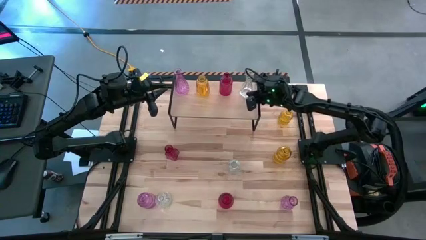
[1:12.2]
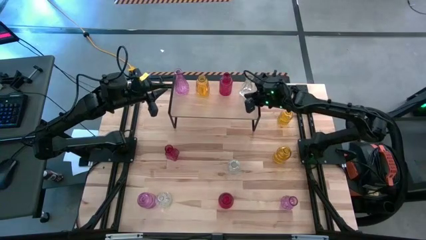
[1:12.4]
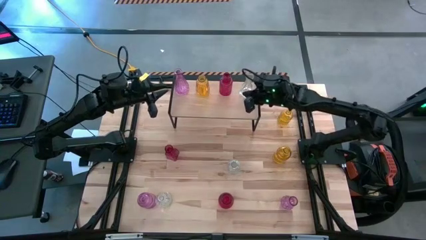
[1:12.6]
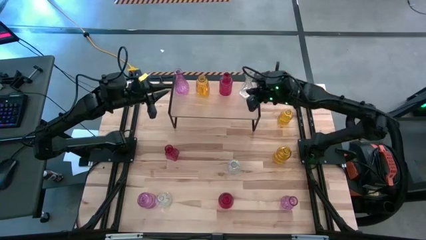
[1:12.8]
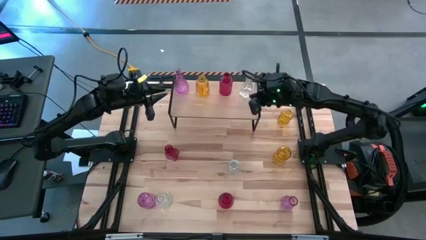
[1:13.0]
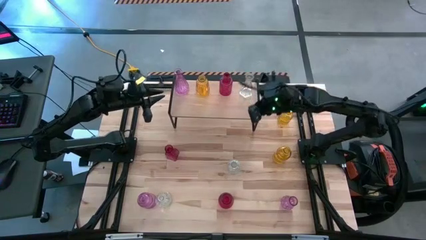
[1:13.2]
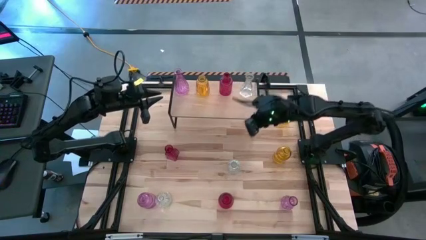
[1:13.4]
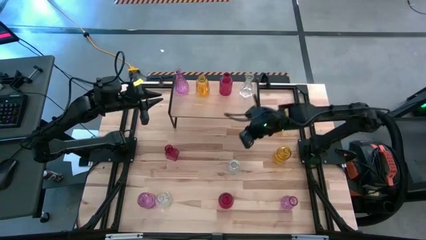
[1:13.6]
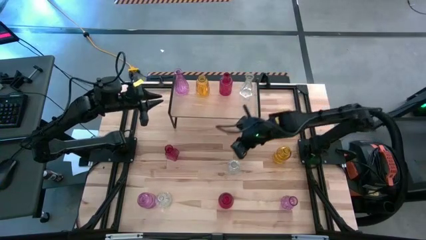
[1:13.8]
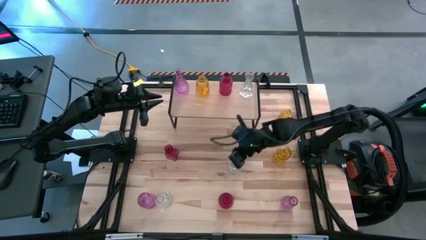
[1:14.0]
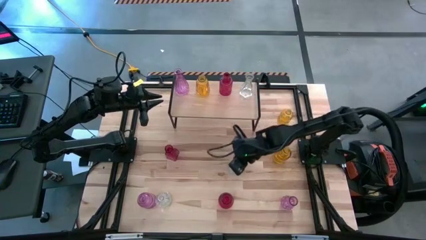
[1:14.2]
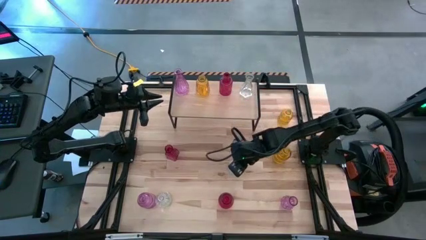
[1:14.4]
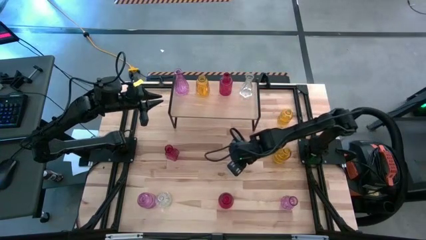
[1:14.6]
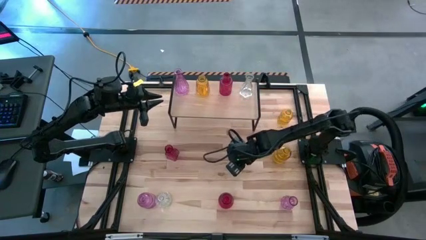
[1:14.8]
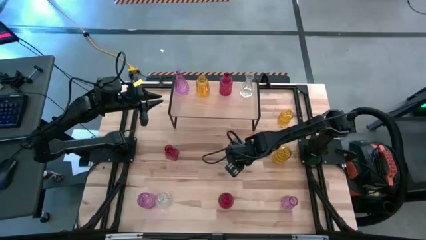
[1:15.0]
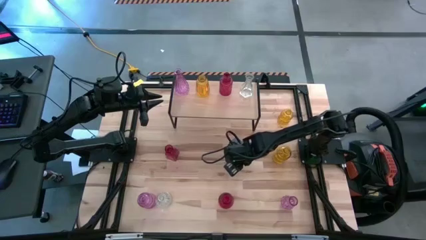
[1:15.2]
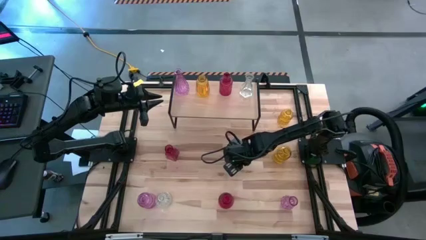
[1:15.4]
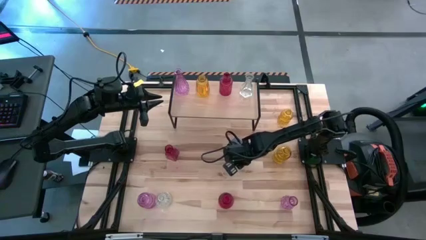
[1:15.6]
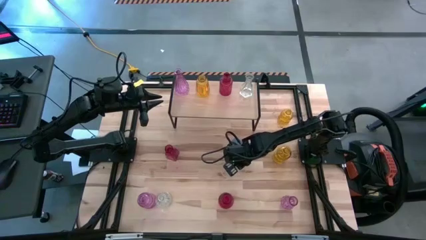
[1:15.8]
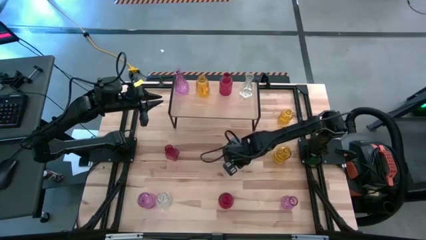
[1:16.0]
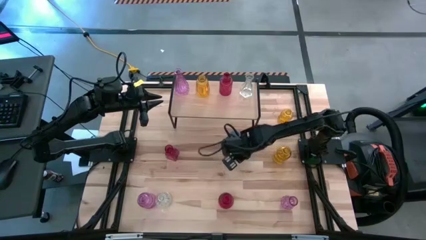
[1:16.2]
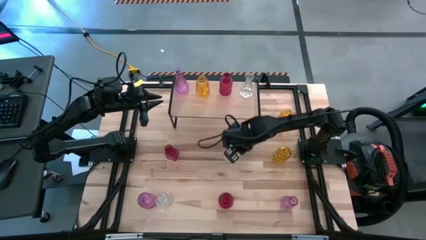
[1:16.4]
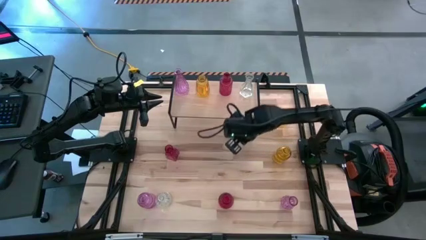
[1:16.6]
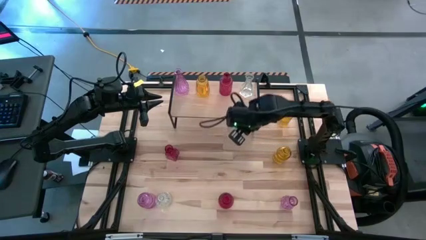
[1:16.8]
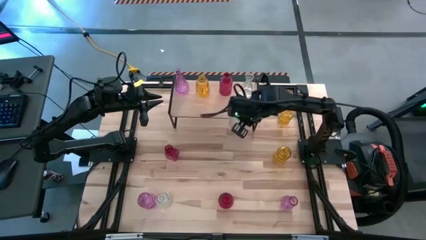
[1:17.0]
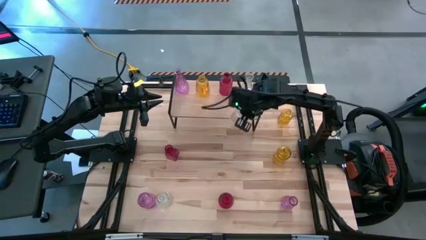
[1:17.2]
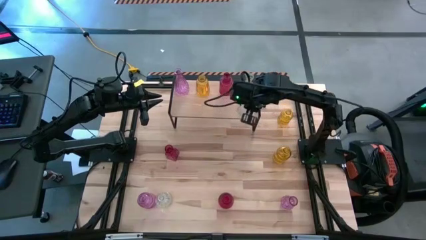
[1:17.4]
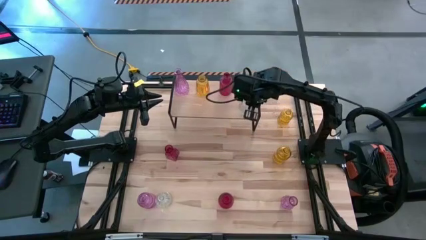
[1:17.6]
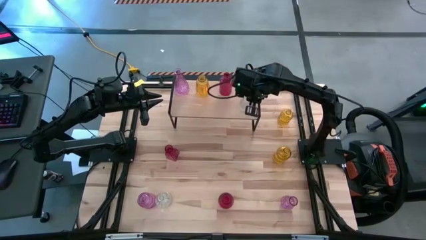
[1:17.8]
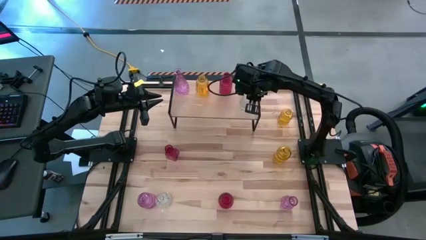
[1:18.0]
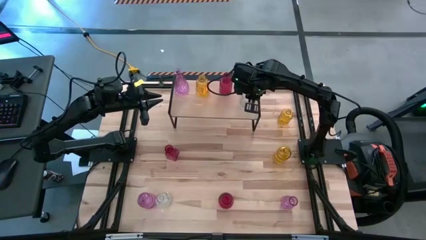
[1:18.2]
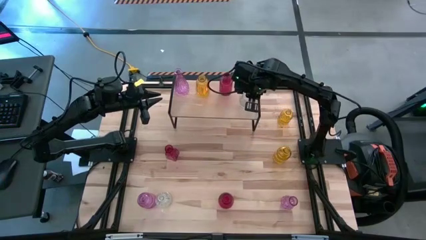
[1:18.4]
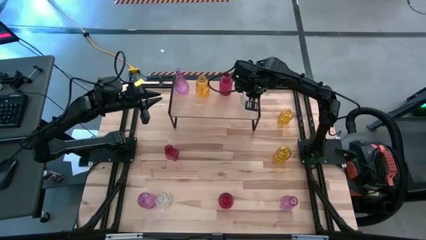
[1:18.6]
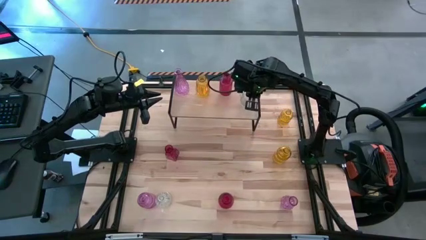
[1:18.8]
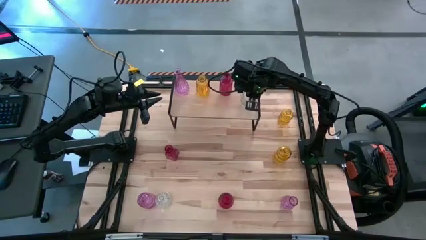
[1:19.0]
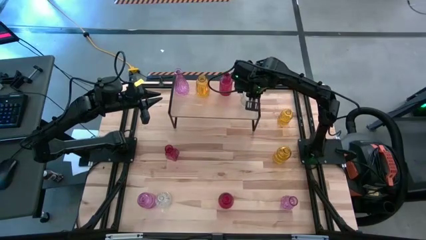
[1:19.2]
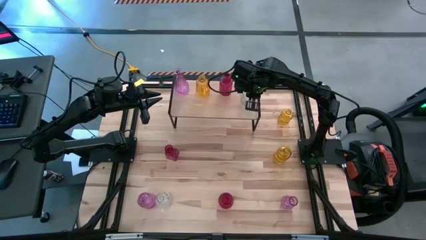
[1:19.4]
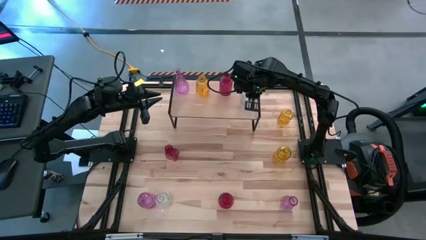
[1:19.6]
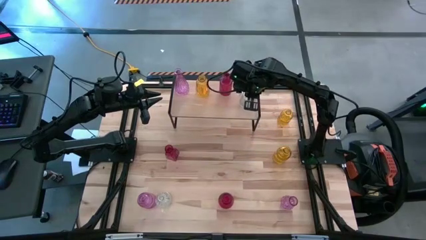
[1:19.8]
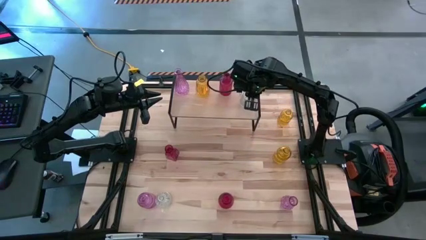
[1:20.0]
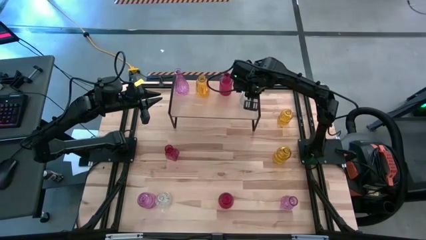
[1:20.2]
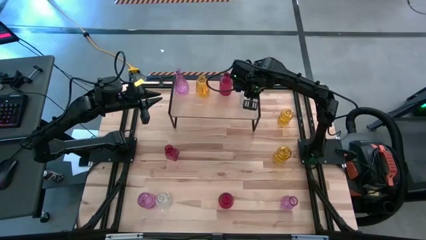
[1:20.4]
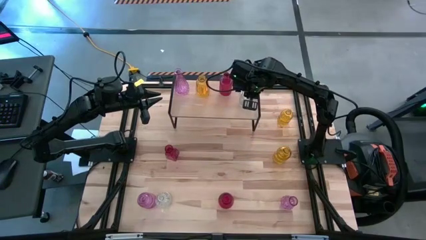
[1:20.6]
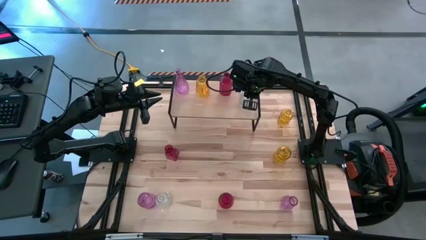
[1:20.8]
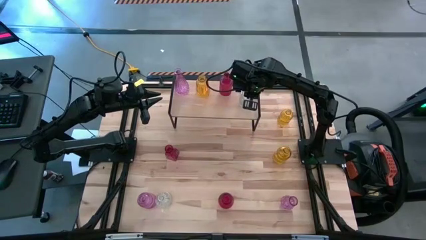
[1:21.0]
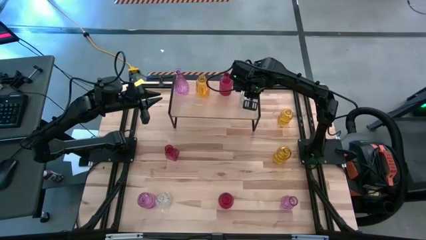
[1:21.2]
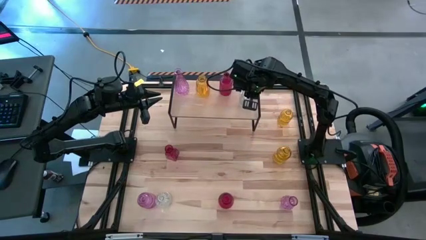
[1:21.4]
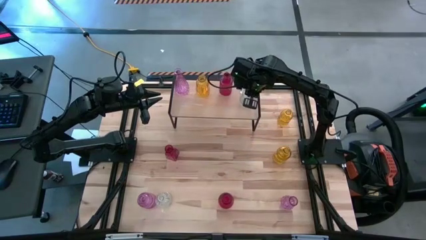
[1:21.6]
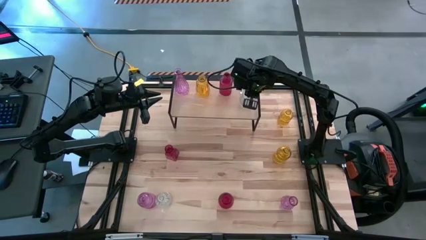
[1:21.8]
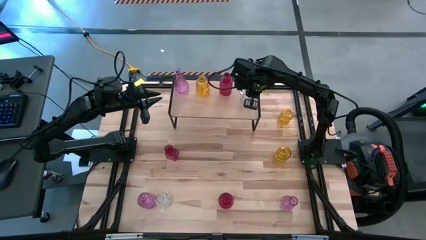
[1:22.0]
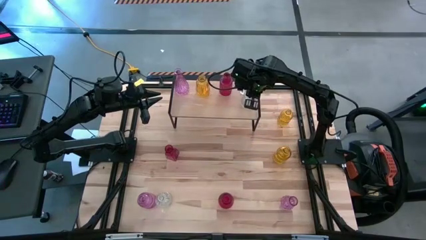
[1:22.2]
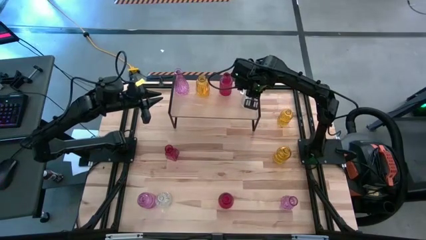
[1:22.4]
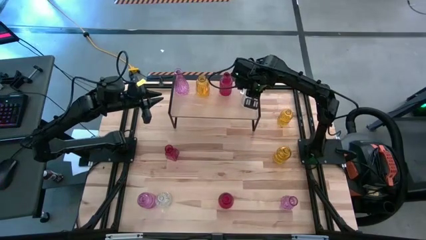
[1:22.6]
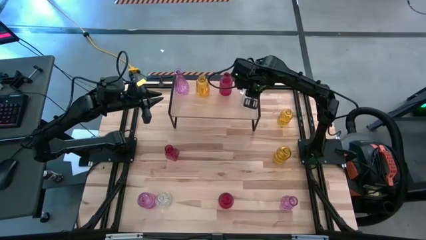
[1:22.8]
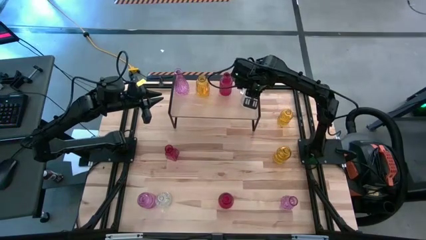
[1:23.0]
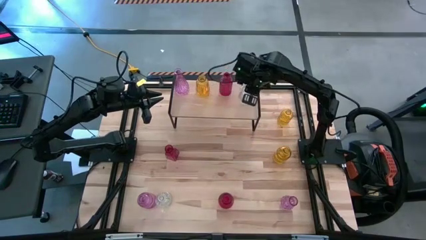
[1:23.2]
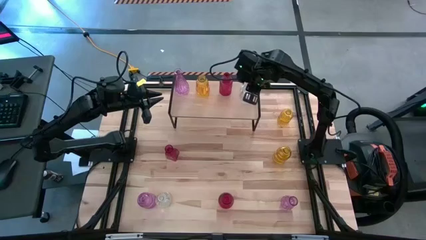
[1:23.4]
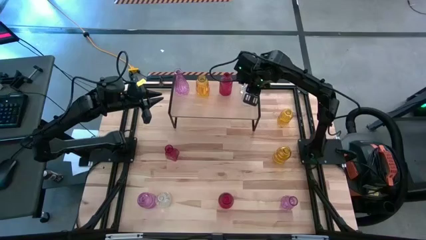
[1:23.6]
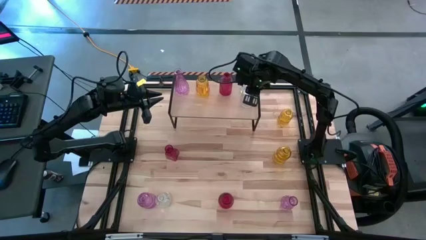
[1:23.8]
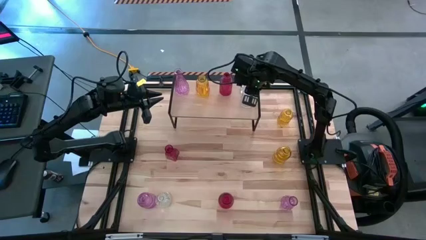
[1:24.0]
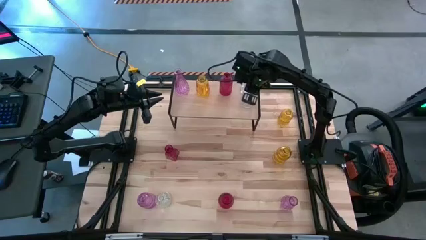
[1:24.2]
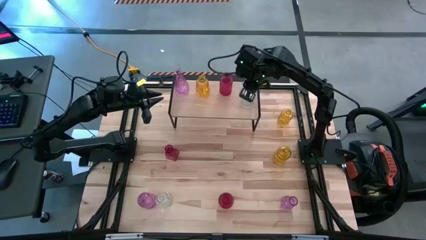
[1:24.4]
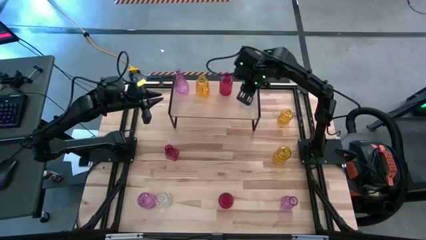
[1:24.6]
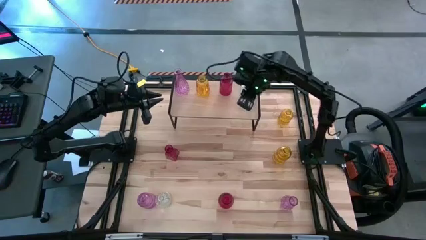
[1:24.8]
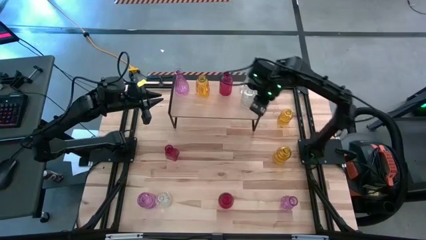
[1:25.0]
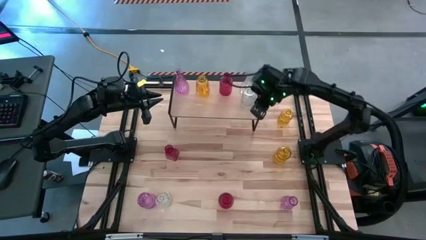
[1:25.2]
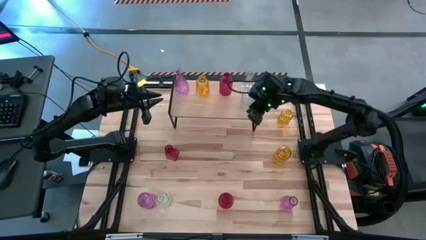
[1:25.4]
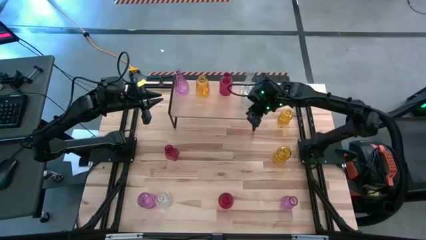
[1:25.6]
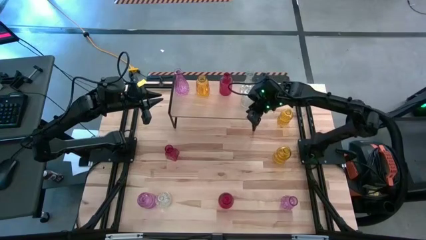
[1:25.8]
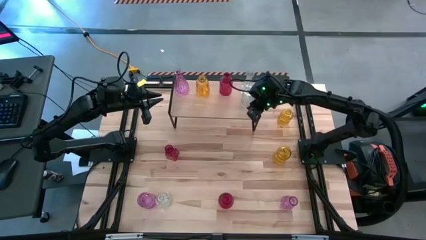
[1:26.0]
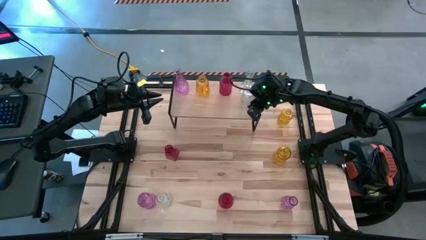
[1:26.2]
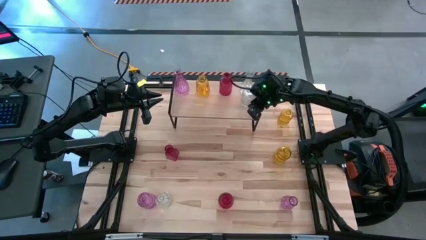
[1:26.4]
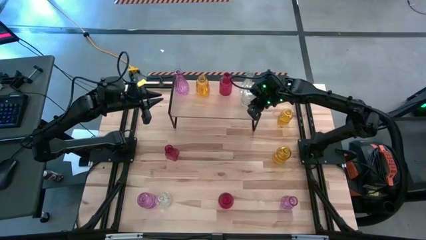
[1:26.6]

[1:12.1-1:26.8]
Task: sort vases onto shelf
Put the right transparent vase on the shelf and align it with the other transparent vase

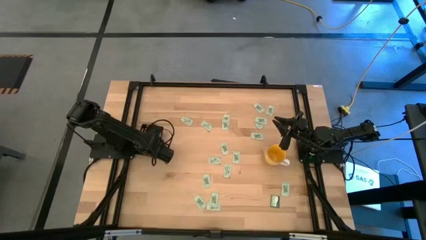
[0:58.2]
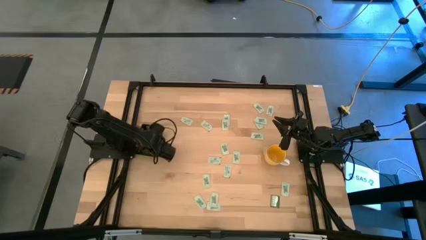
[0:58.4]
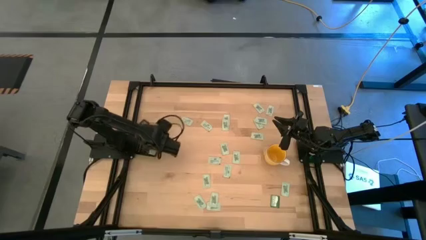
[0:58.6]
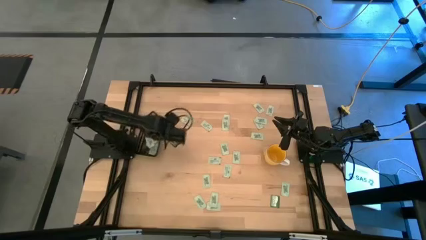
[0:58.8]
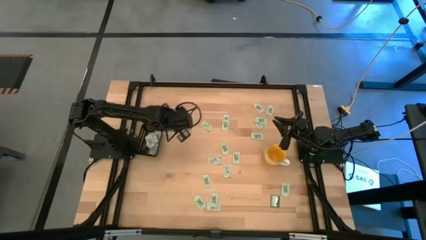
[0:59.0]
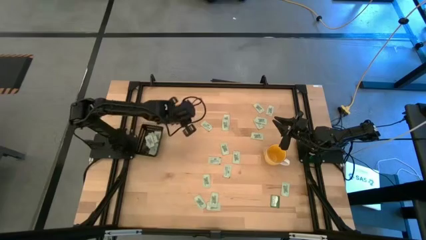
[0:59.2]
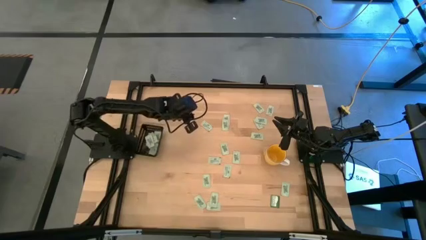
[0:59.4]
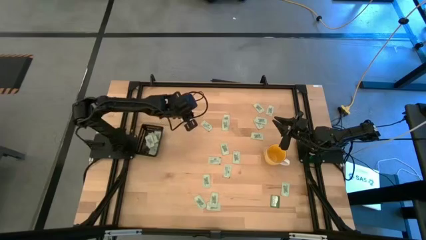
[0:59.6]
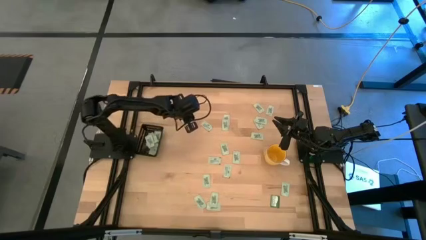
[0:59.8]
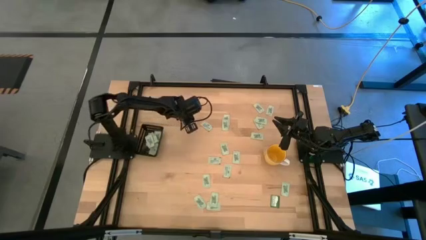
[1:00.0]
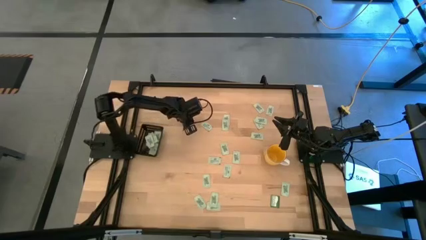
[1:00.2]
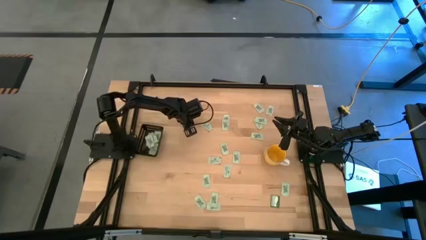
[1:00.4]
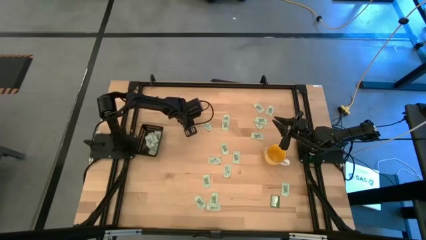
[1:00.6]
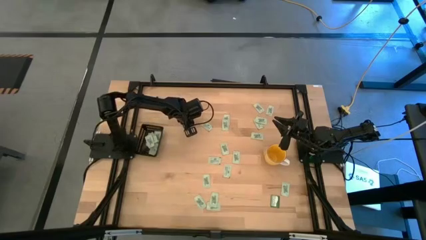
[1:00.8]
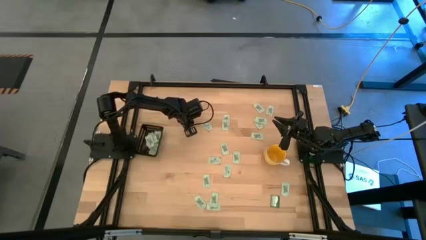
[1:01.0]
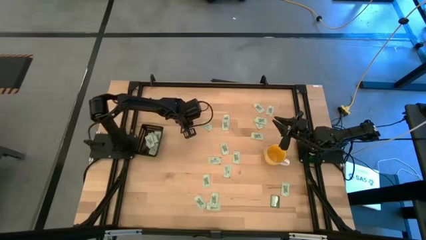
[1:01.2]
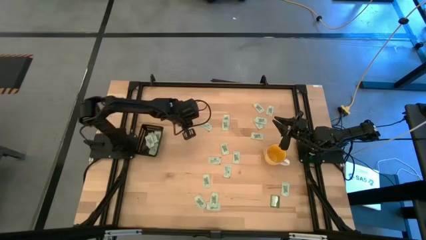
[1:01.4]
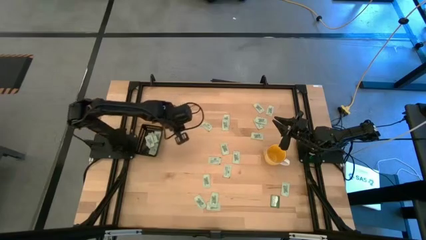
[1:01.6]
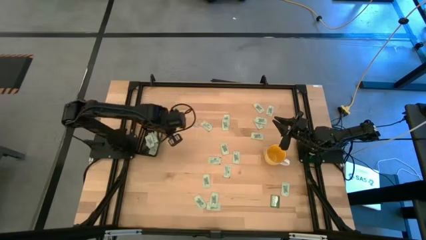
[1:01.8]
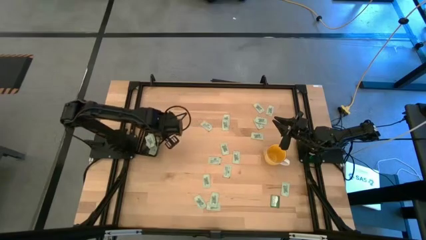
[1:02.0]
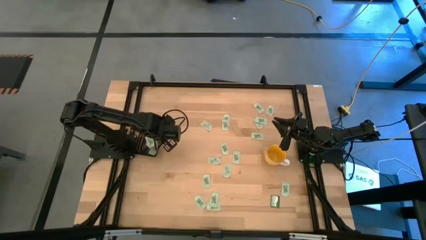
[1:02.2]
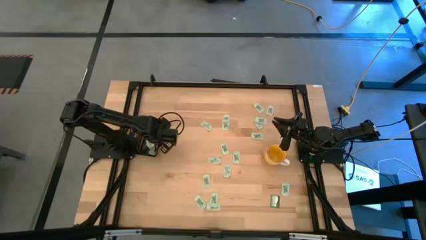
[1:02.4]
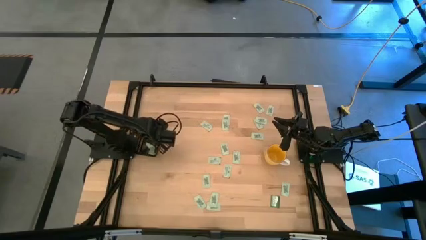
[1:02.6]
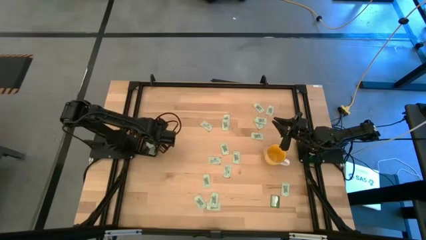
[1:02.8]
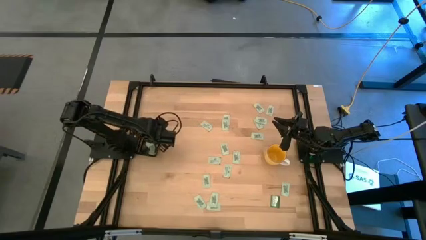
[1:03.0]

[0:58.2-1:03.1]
Task: Pick and place Stevia / Truvia into bins
Put the stevia packet into the black bin
